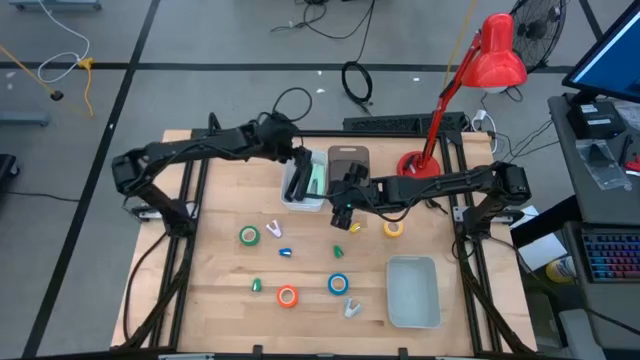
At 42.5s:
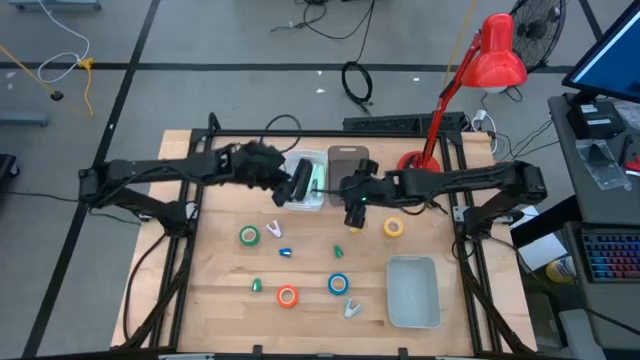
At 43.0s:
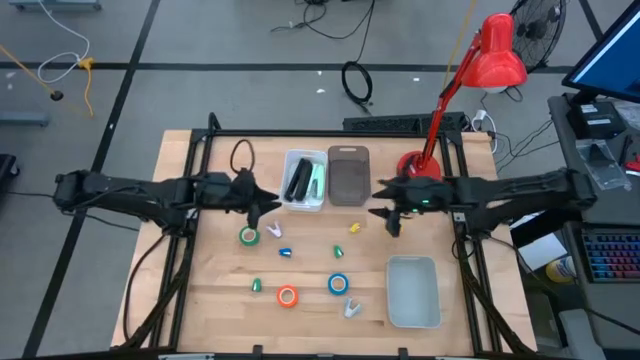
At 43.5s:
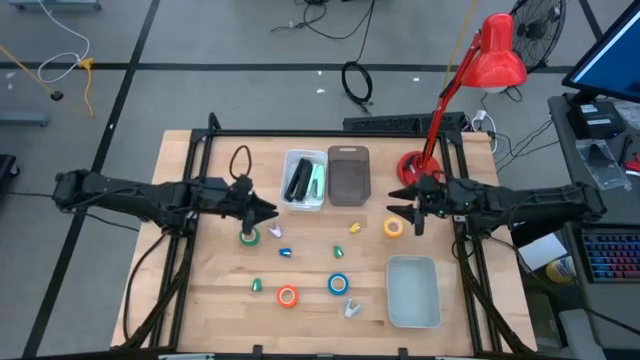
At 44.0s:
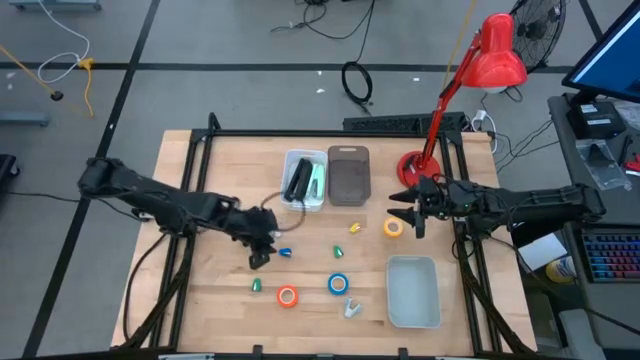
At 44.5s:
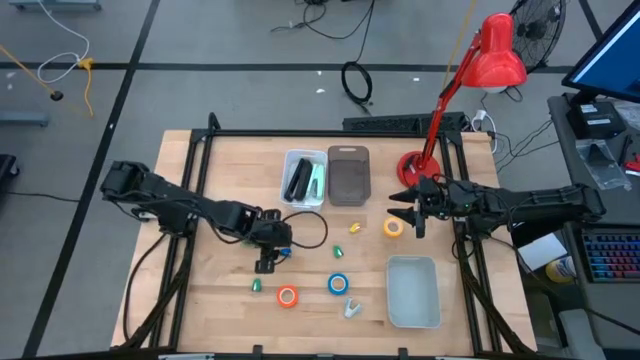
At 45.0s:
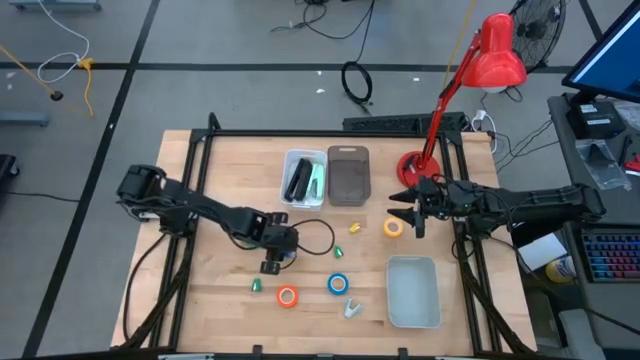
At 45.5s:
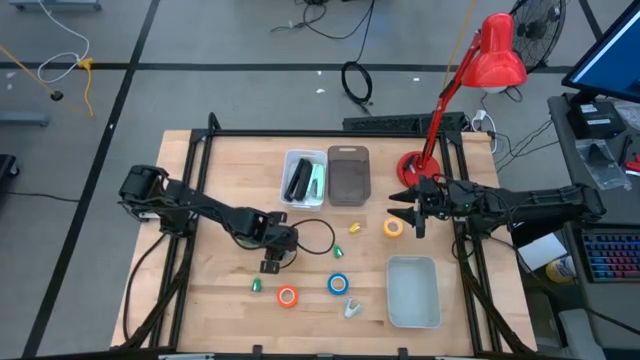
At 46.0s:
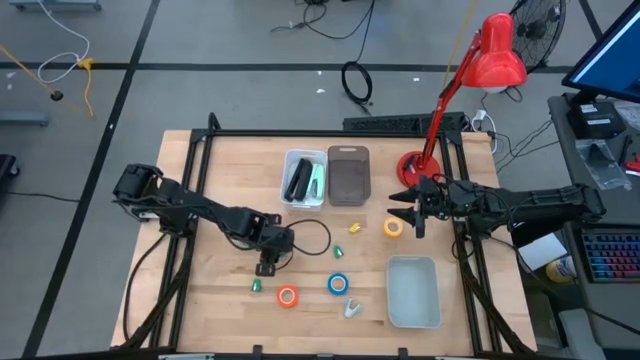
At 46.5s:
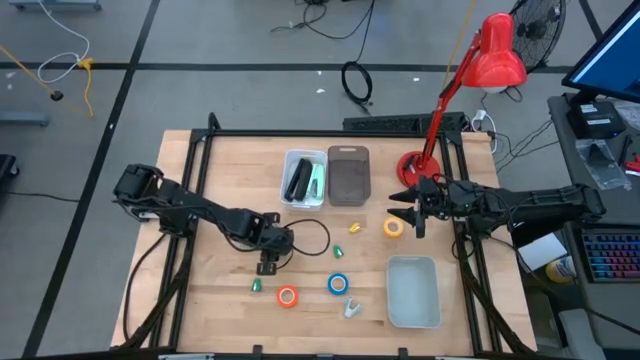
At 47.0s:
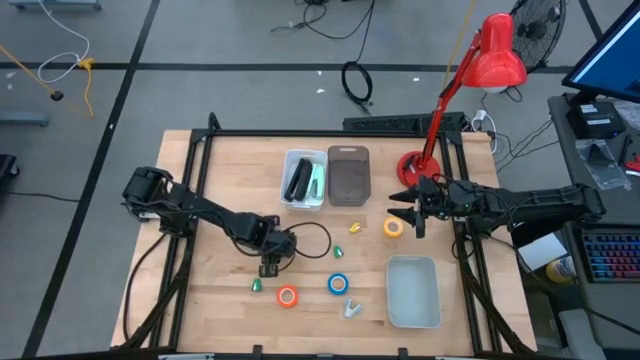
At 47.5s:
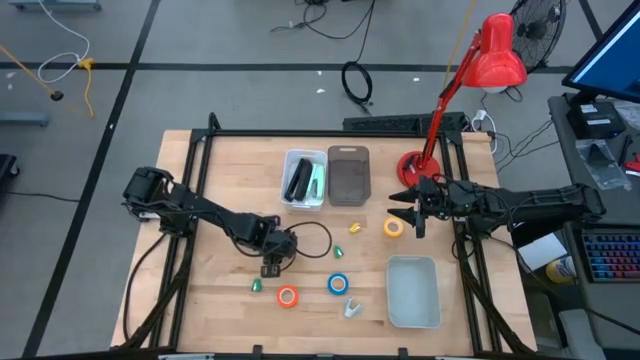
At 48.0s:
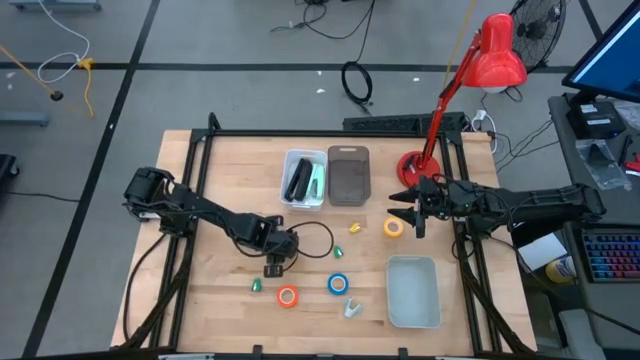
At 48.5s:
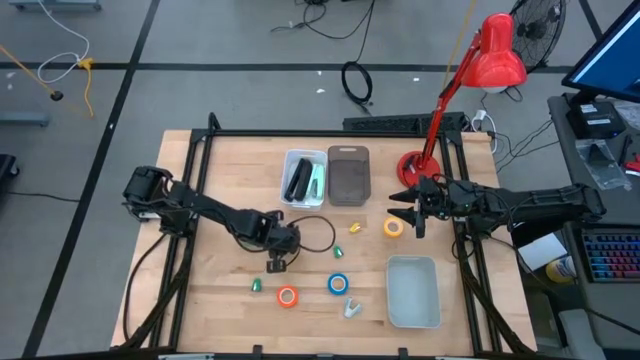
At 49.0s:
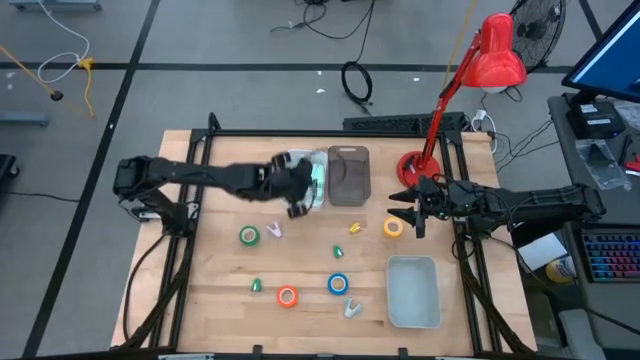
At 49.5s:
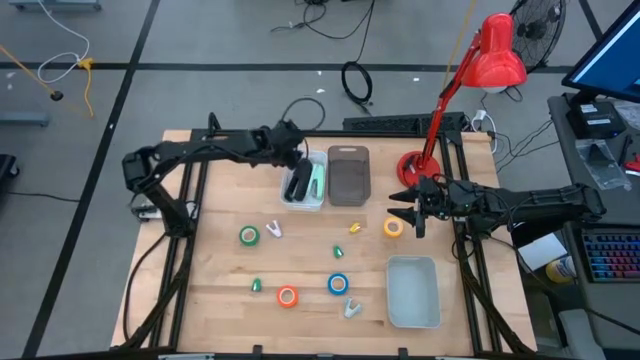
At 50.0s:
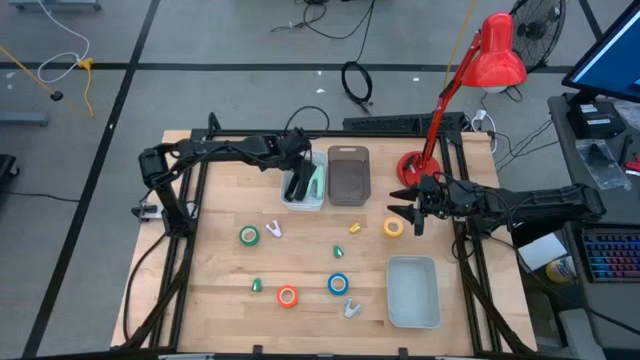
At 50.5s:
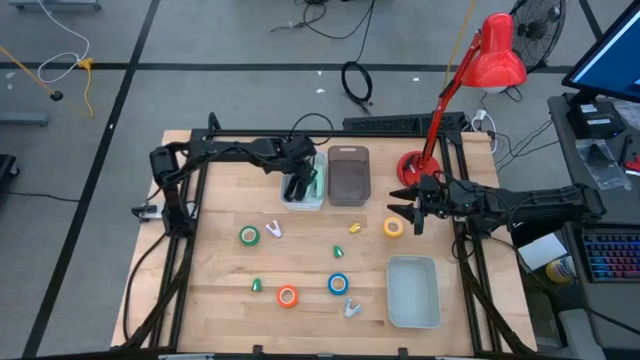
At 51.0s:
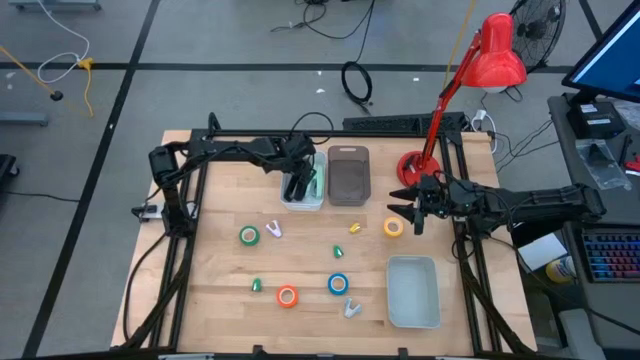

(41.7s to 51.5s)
Task: Pick and place Stapler, Stapler remover, tape
Put the blue stapler into the white bin

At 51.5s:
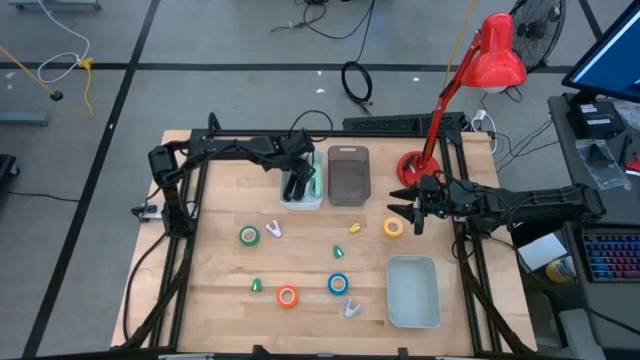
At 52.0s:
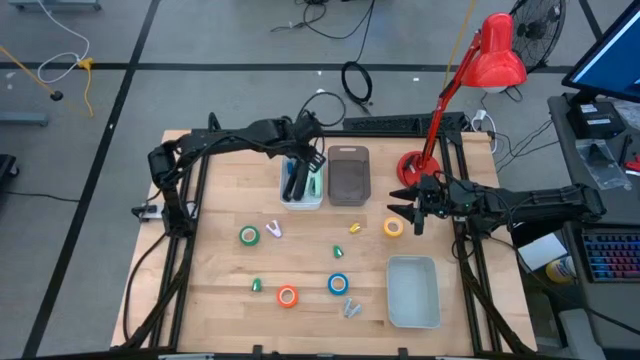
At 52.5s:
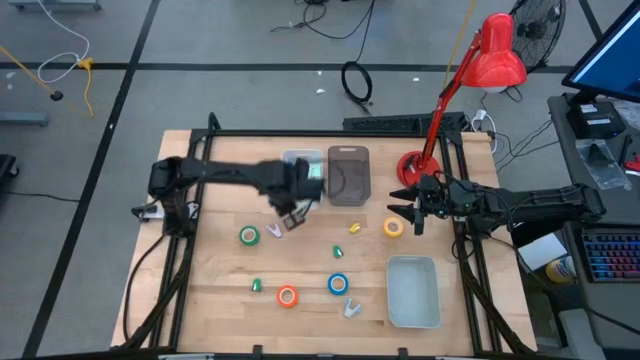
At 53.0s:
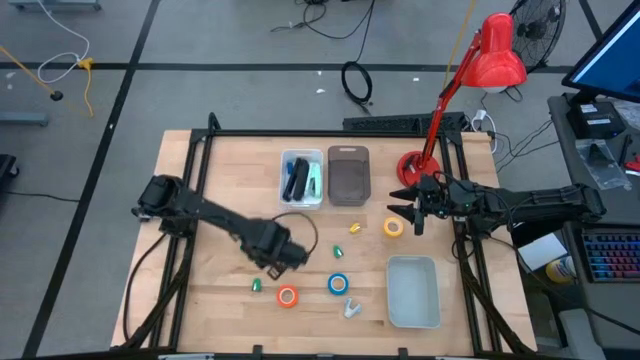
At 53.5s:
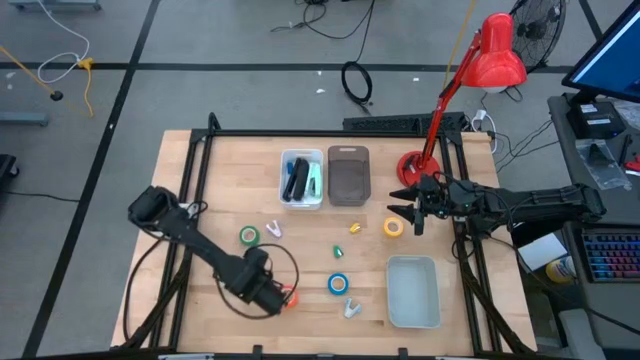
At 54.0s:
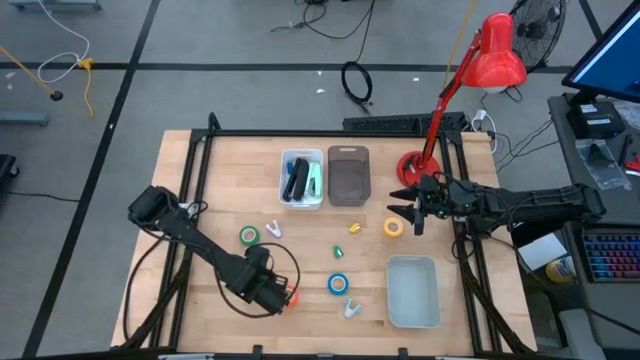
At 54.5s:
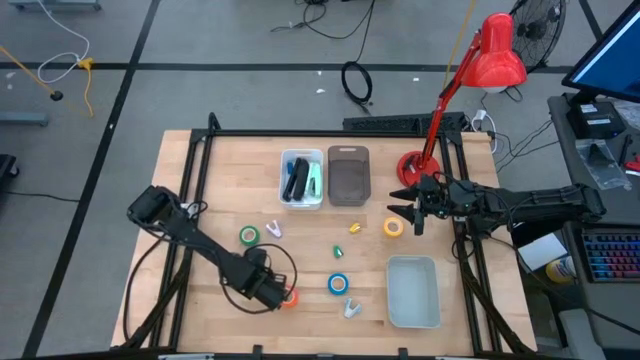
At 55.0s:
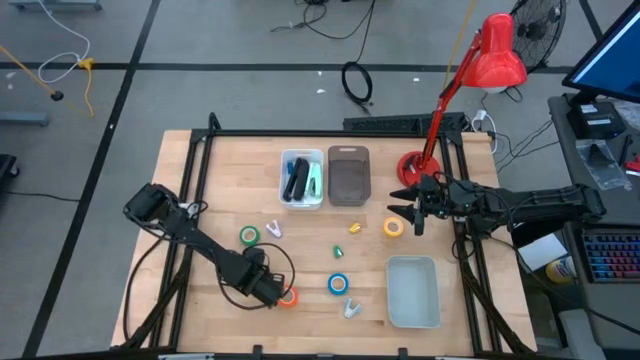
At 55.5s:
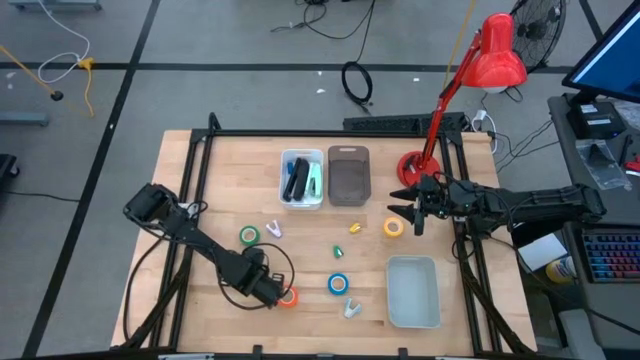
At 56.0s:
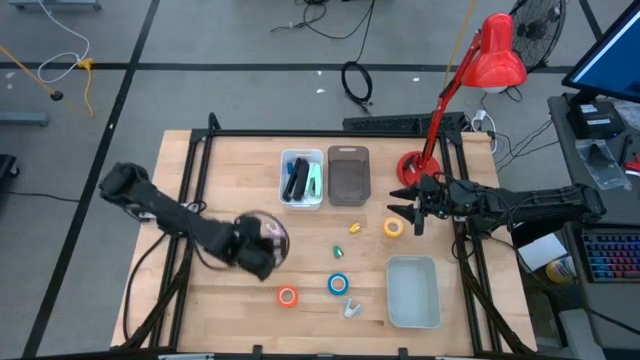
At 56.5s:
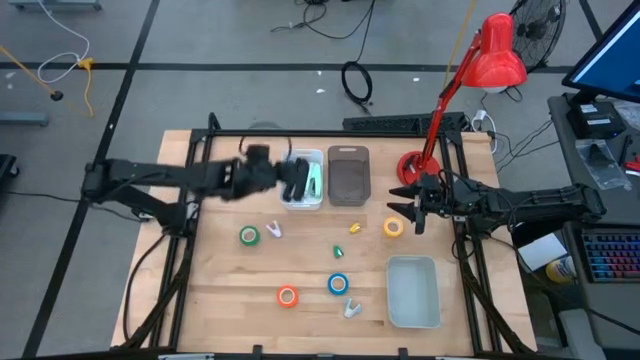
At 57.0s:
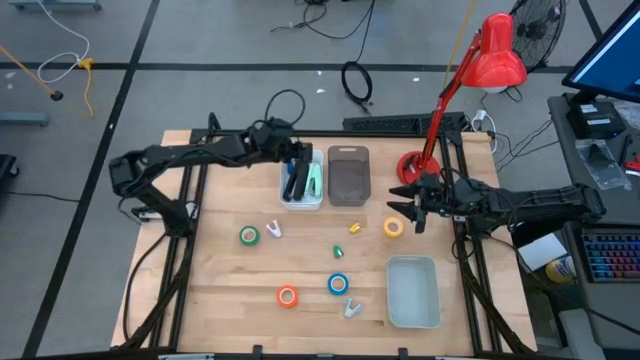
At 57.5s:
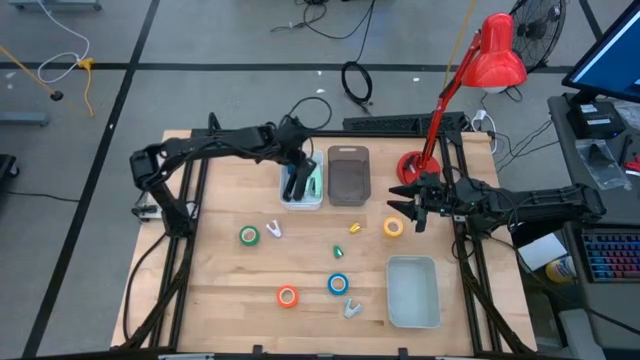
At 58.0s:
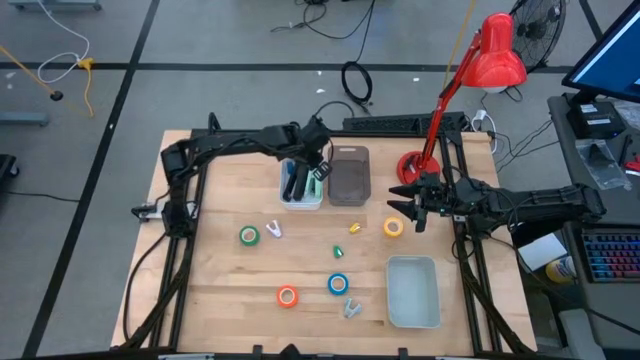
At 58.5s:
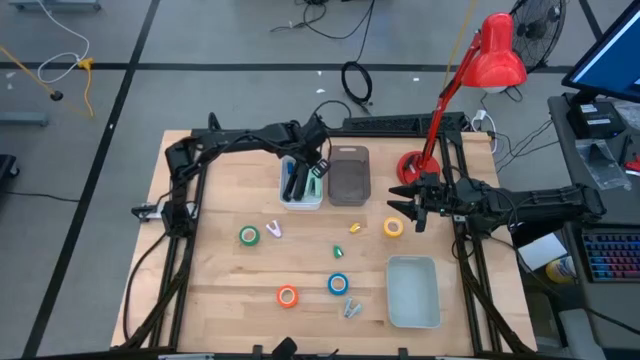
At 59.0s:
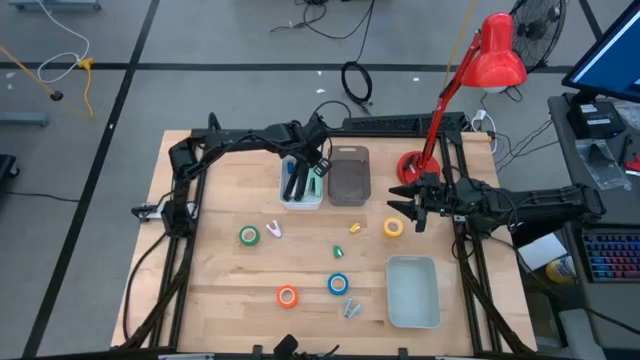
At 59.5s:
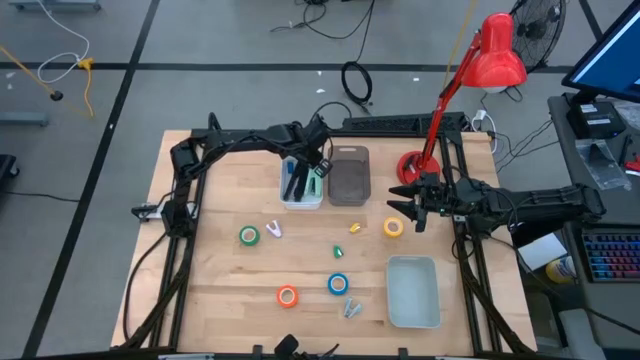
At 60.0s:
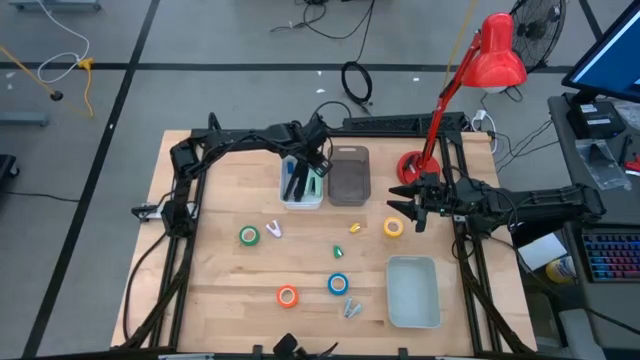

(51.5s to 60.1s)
Put the left green stapler into the white bin
